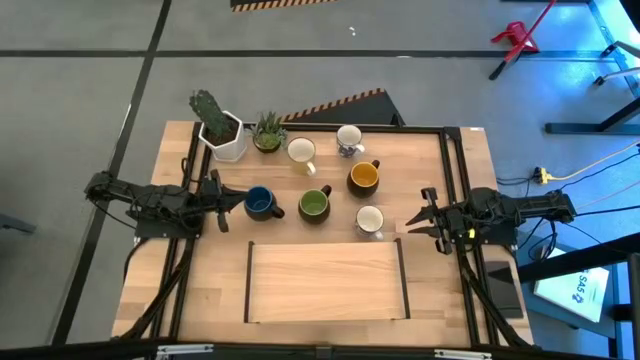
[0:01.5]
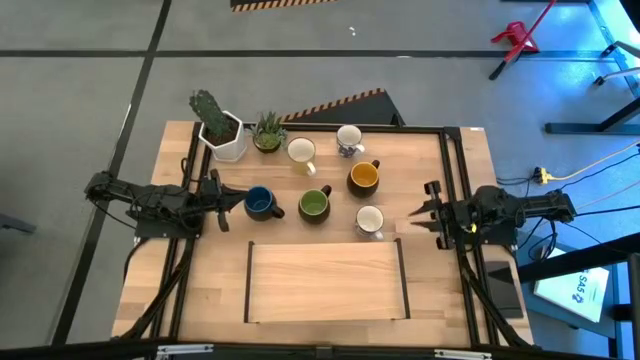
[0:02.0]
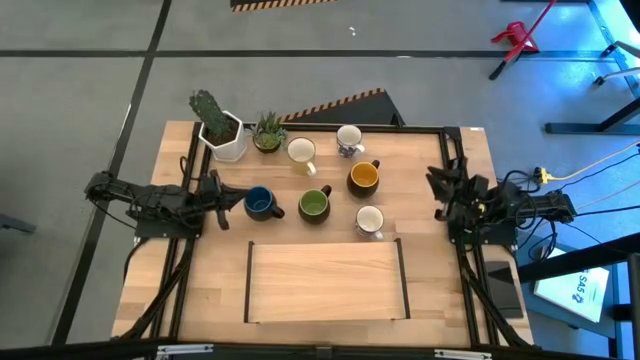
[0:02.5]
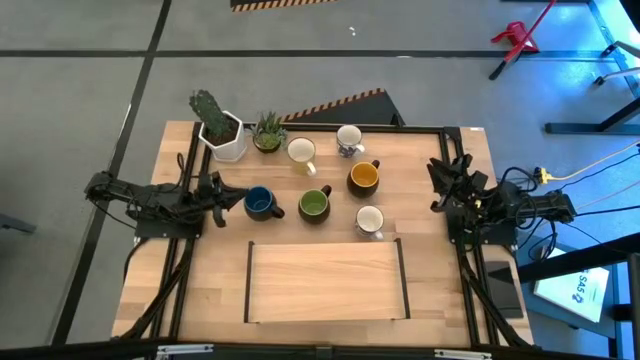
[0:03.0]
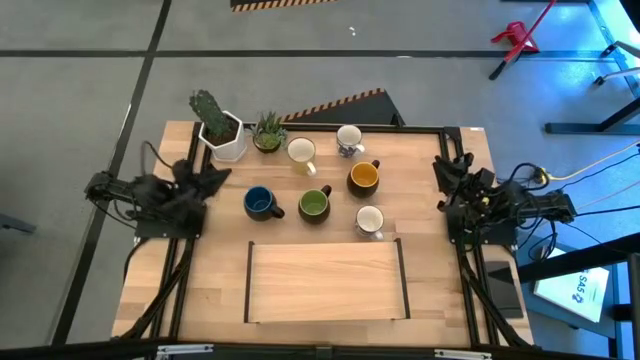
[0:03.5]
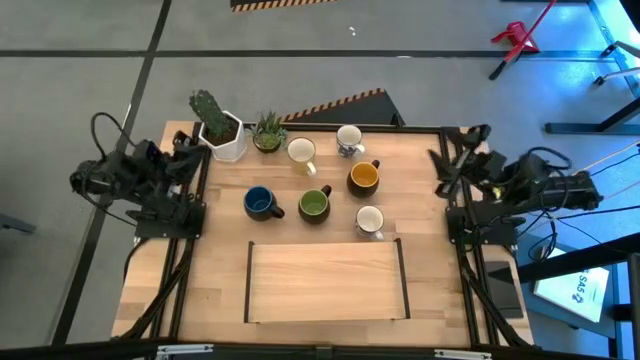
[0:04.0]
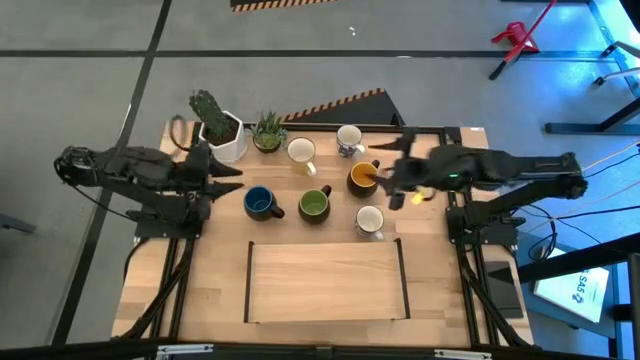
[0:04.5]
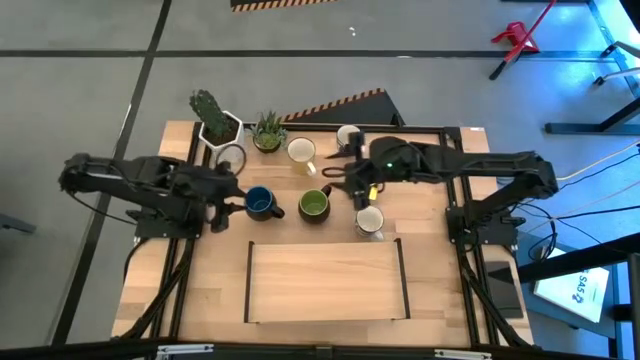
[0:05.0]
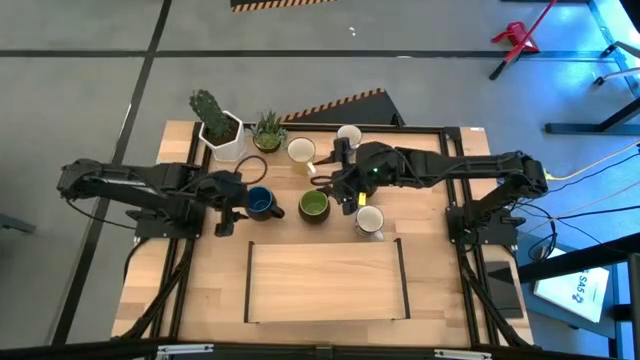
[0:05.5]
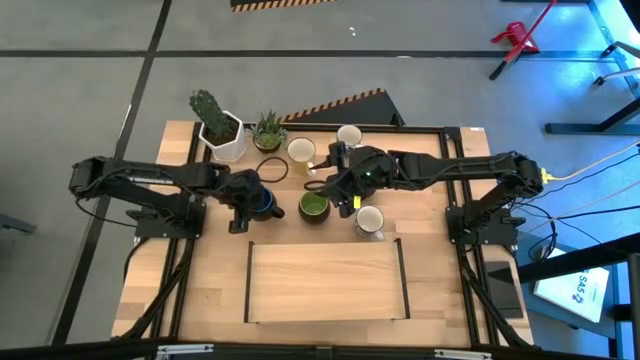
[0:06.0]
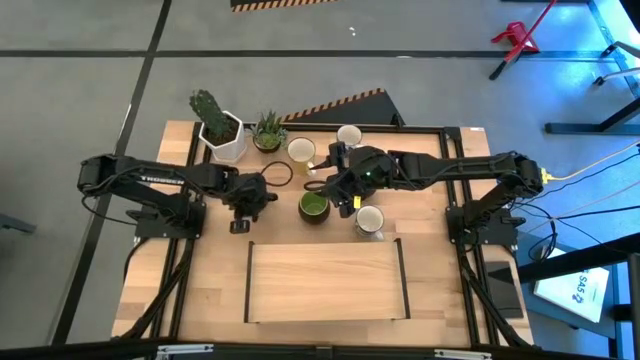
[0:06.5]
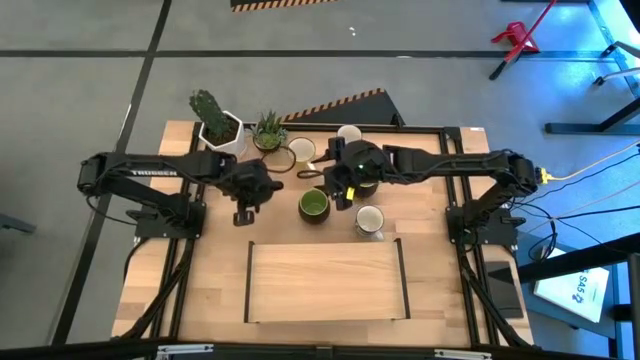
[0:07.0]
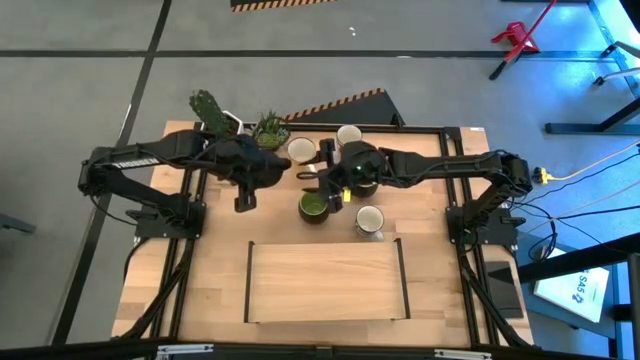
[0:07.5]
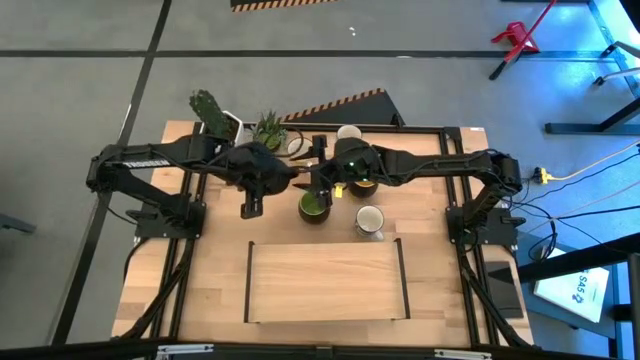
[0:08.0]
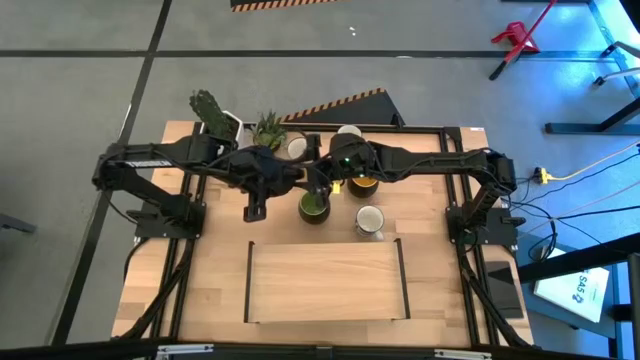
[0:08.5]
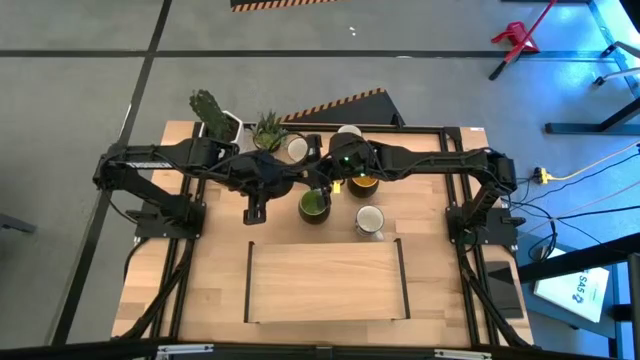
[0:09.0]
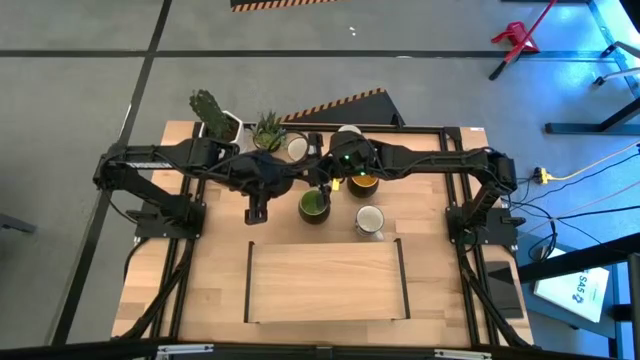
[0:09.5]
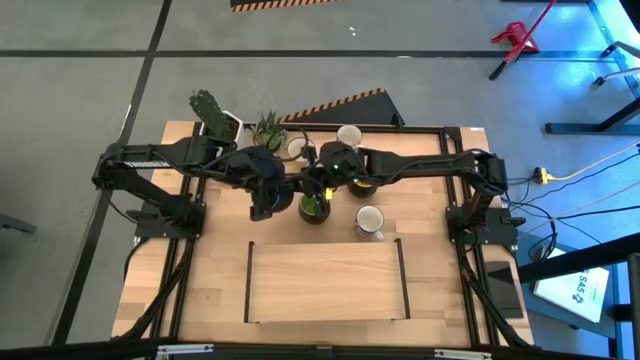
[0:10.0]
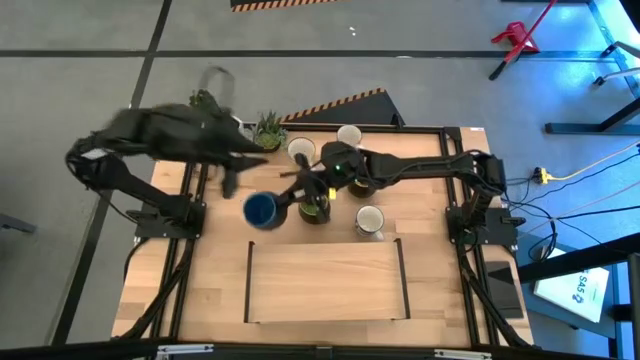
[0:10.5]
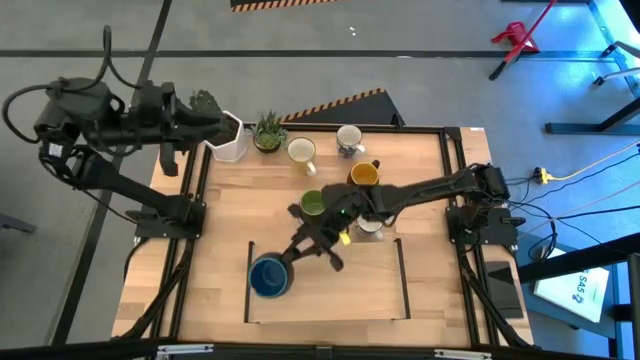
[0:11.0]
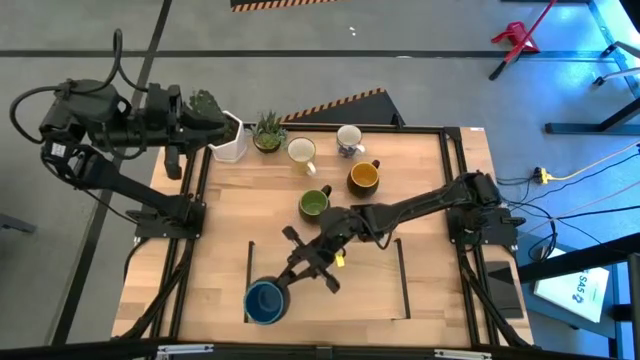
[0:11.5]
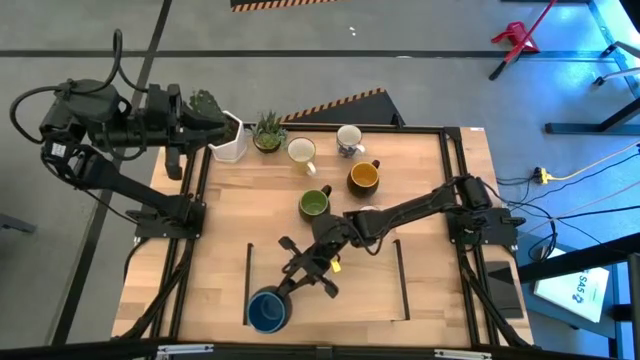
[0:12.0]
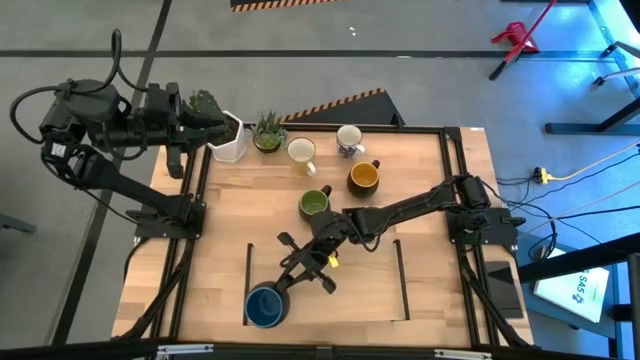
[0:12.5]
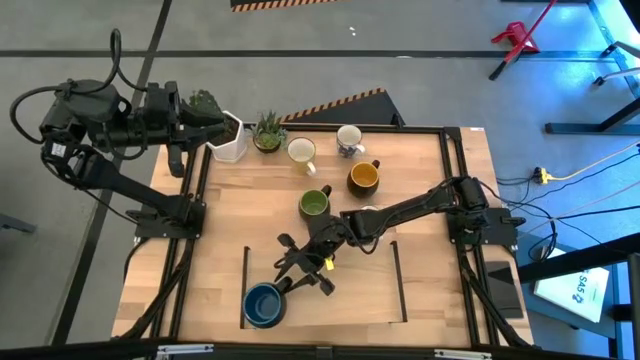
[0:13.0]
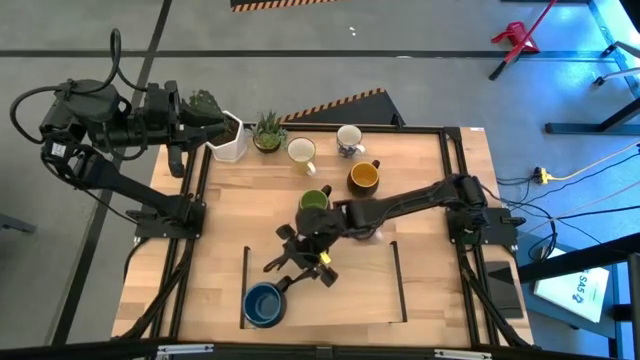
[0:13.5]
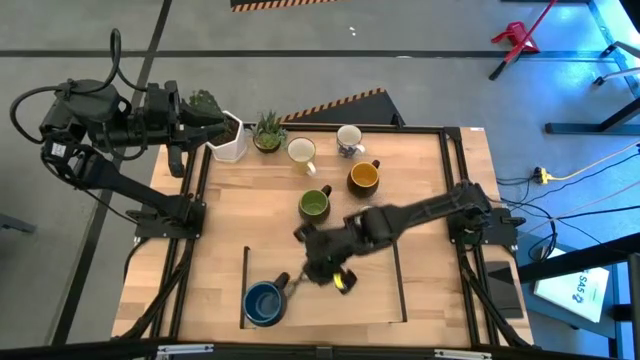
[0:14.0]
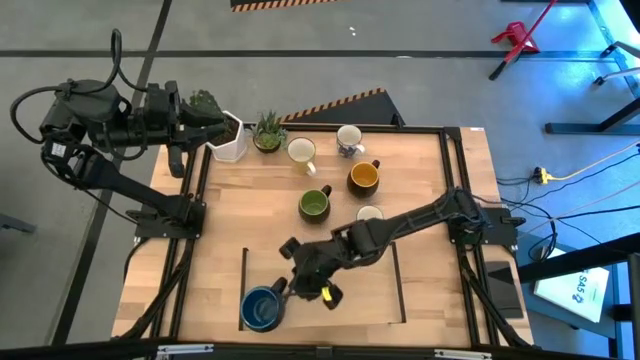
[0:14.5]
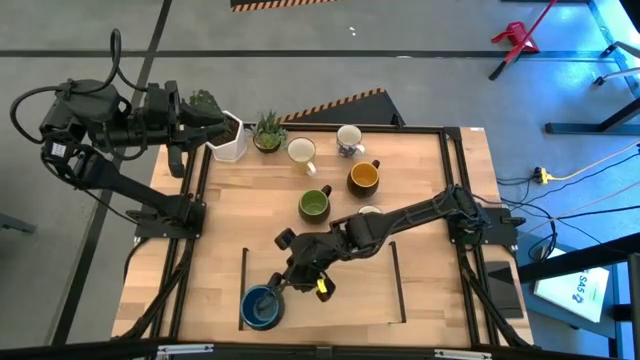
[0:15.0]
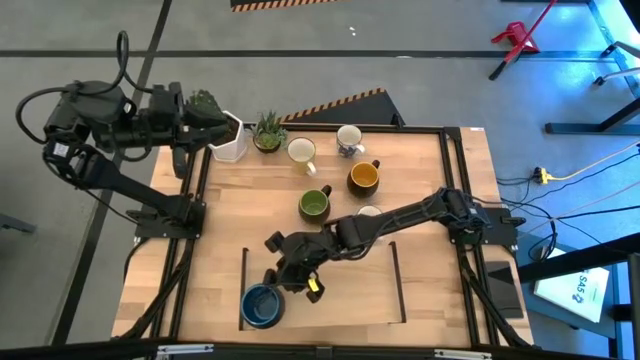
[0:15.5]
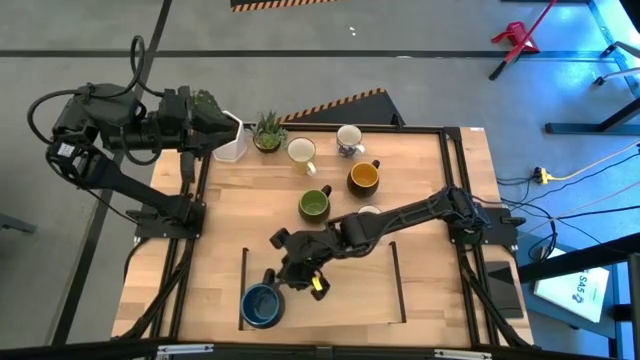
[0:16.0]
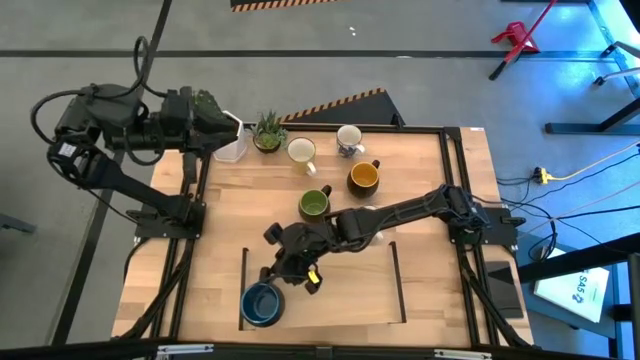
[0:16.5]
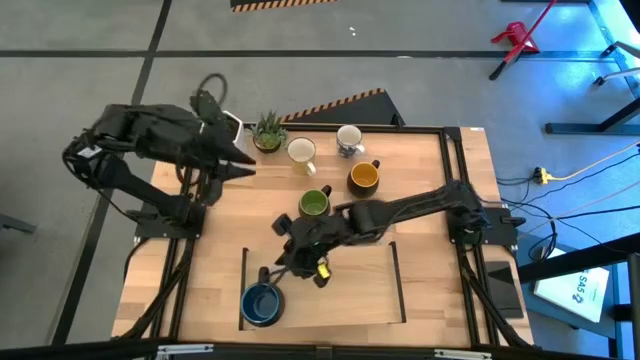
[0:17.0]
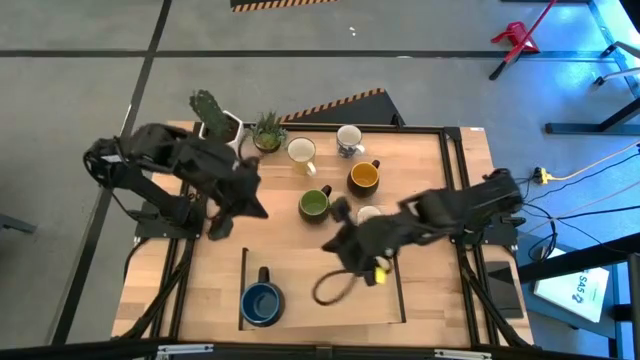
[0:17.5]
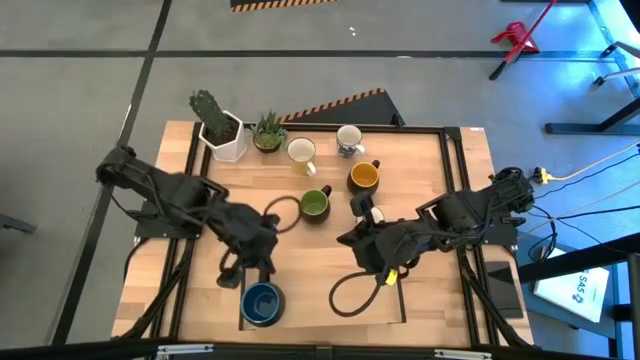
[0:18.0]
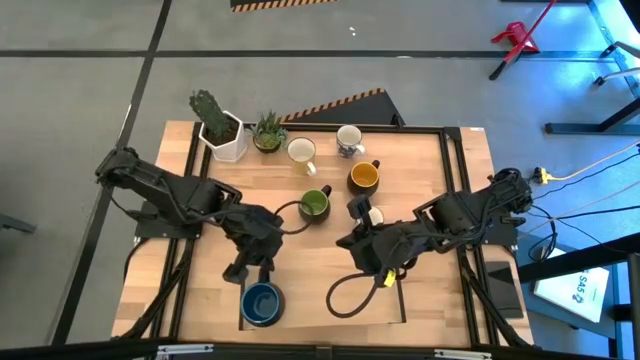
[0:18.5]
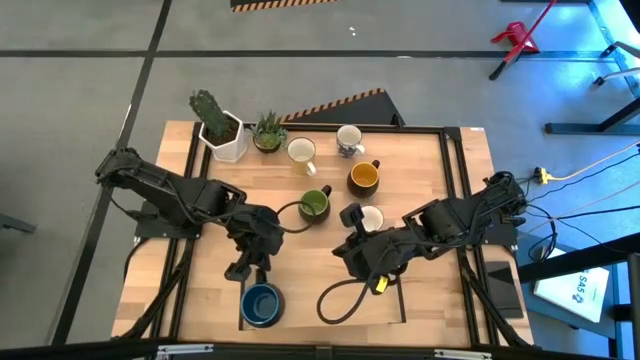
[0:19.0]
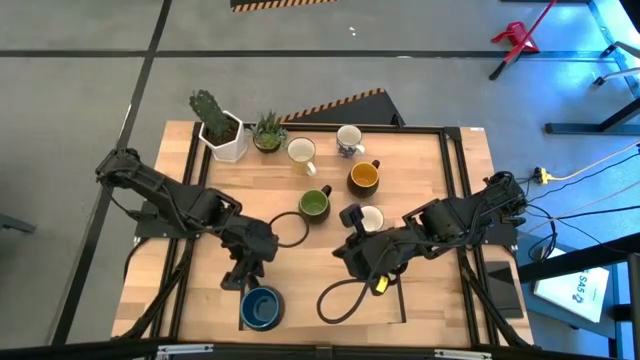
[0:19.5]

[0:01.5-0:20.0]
Task: Place coffee mugs
Put the blue mug on the shelf
